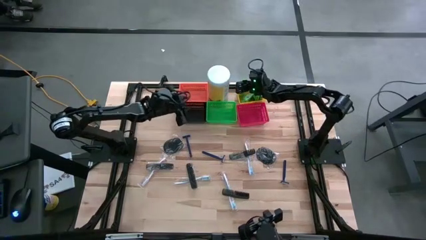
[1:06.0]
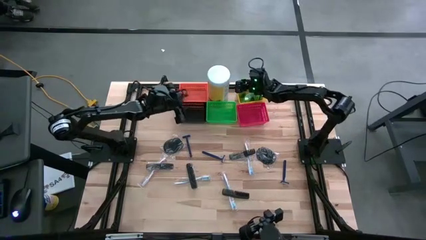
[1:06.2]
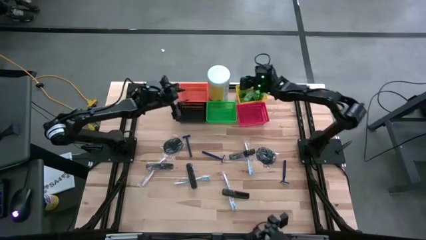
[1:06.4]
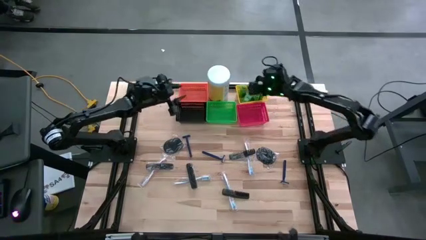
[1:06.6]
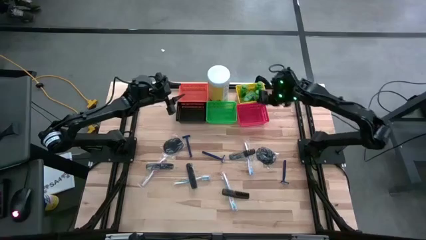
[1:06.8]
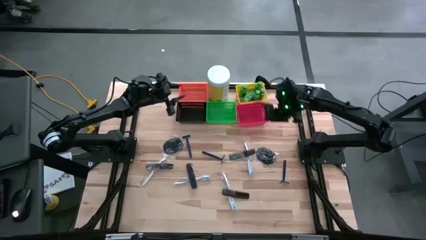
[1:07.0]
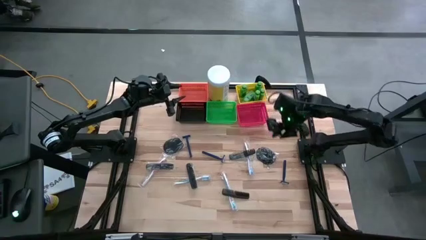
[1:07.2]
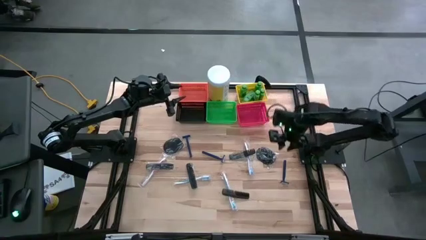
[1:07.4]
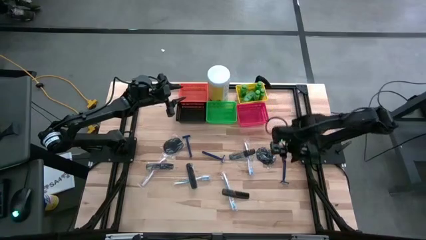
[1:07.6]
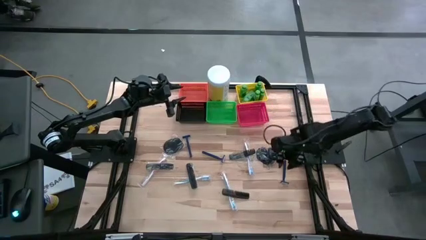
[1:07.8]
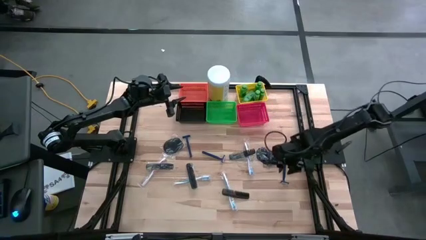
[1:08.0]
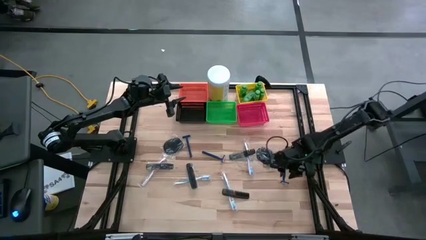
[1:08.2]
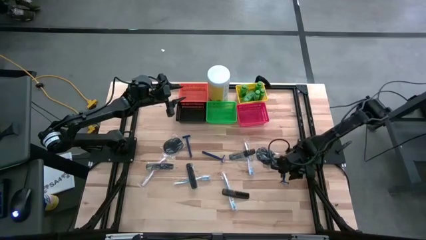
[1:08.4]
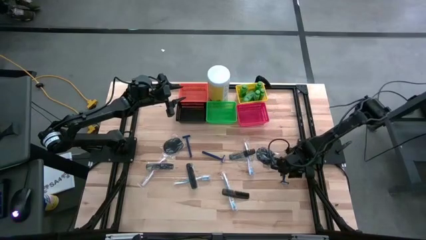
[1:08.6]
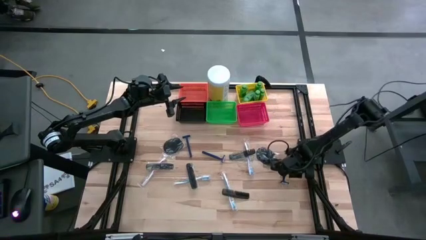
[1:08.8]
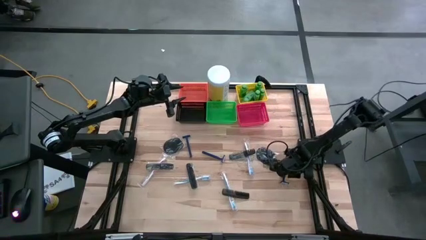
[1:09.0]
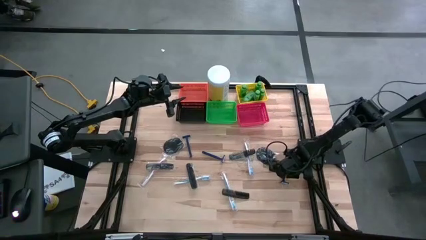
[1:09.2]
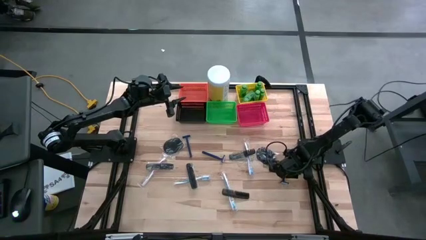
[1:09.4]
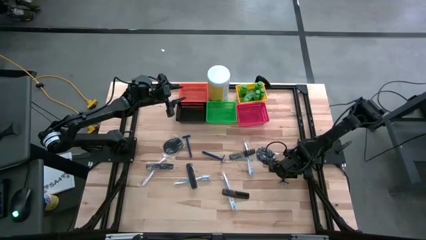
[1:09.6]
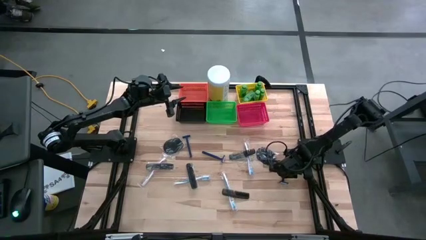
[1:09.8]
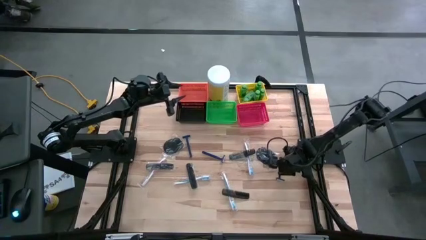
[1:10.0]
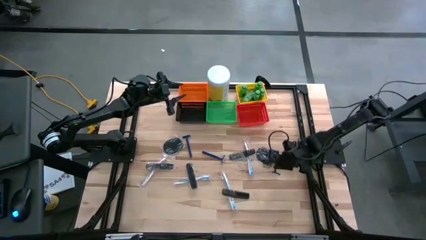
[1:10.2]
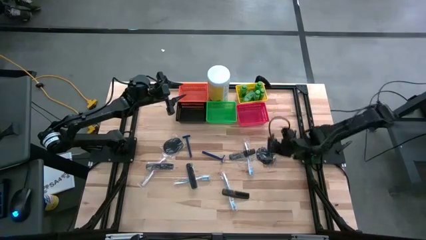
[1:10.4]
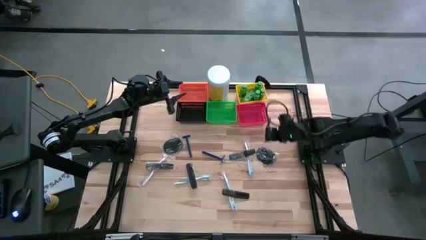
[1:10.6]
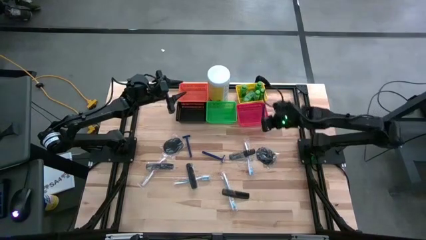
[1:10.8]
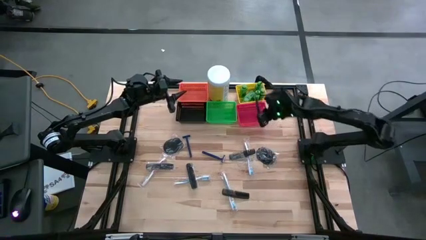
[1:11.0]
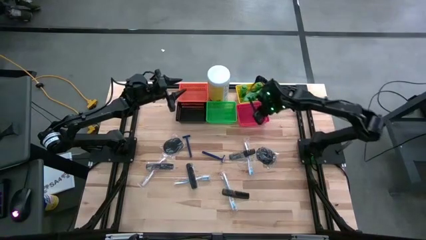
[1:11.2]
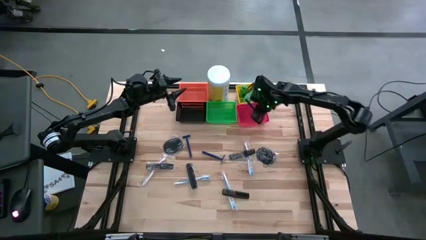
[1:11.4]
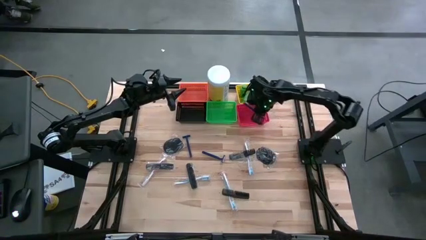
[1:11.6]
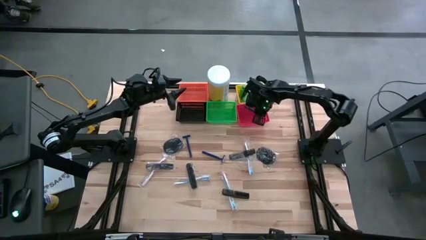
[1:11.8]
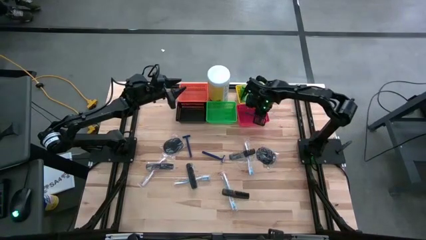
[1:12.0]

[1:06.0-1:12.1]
Task: Pick & Place Travel size toiletries
Put the blue razor into the red bin

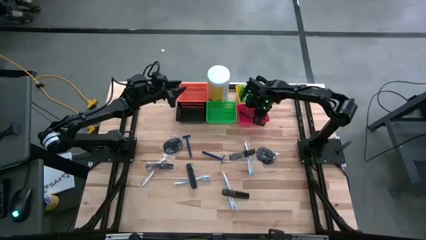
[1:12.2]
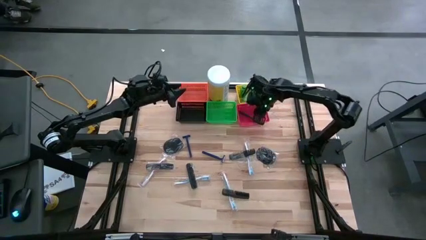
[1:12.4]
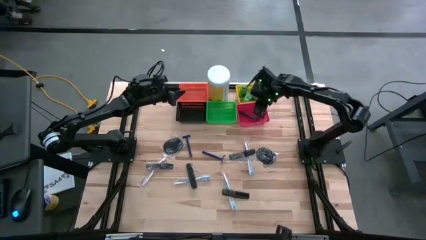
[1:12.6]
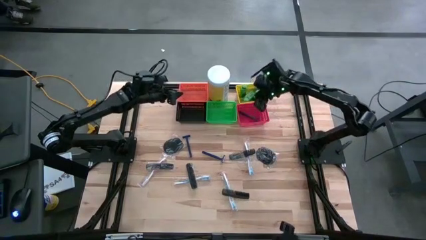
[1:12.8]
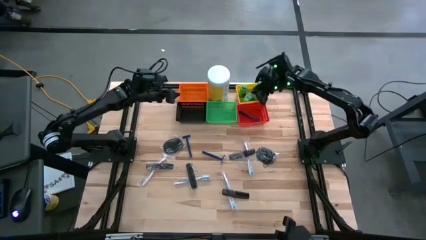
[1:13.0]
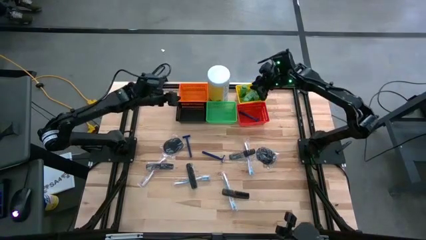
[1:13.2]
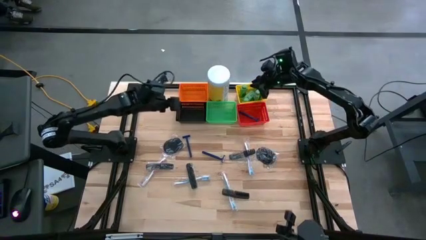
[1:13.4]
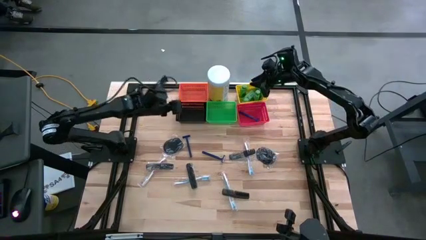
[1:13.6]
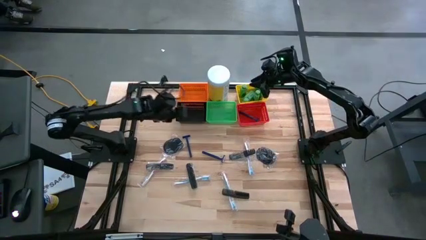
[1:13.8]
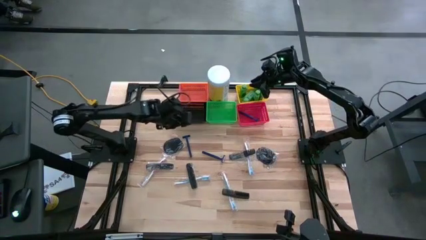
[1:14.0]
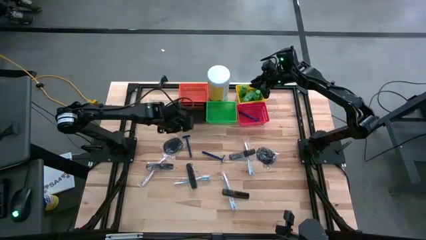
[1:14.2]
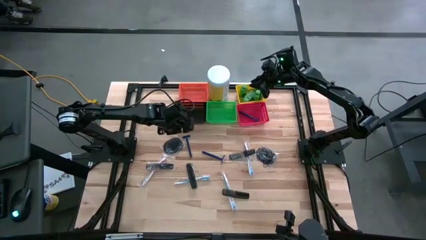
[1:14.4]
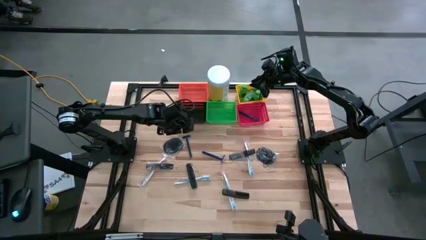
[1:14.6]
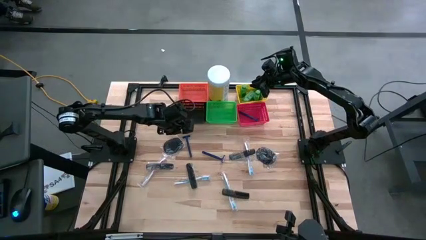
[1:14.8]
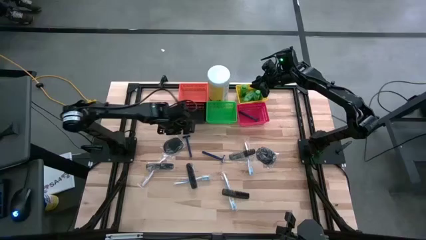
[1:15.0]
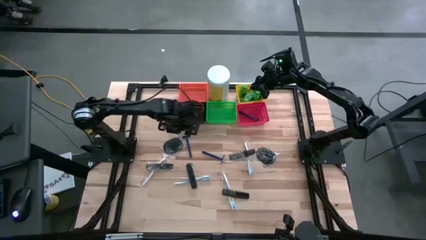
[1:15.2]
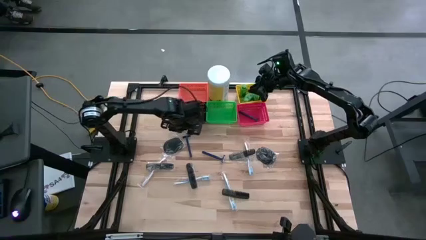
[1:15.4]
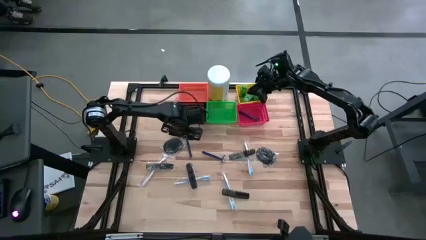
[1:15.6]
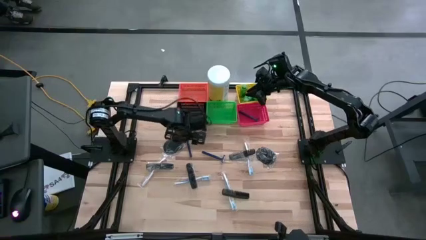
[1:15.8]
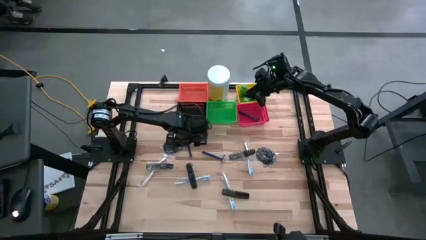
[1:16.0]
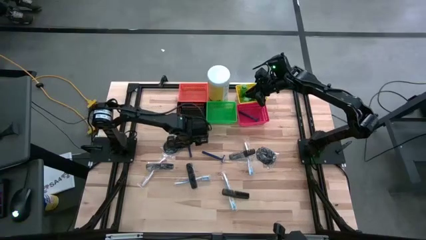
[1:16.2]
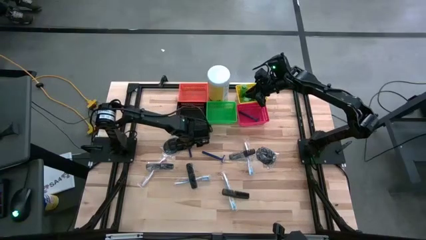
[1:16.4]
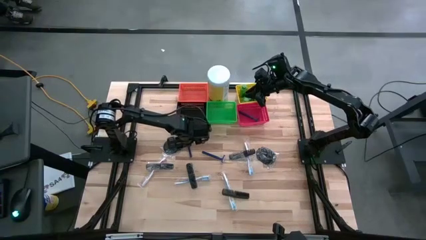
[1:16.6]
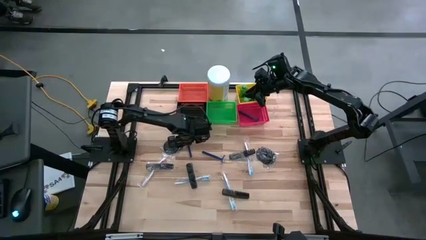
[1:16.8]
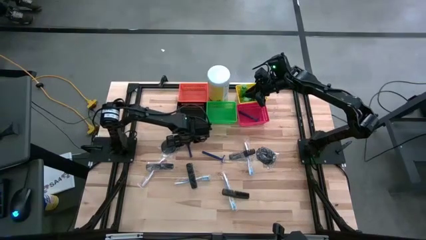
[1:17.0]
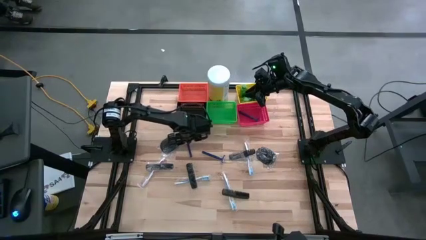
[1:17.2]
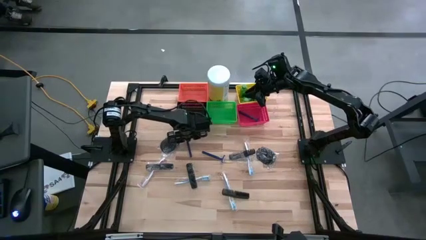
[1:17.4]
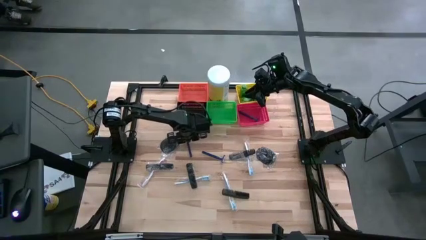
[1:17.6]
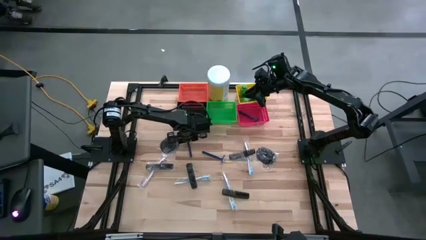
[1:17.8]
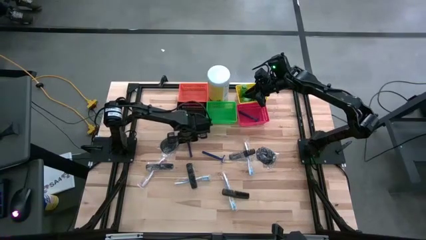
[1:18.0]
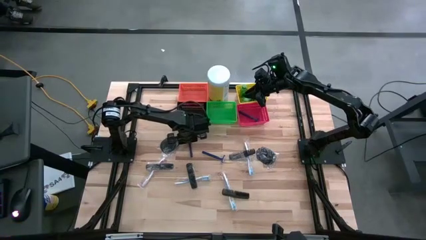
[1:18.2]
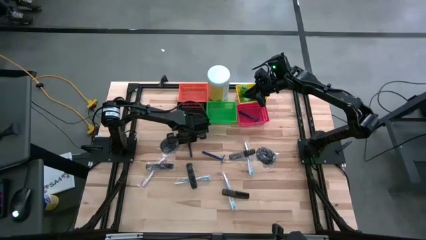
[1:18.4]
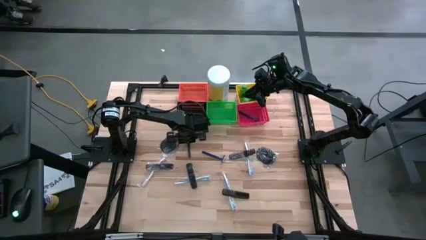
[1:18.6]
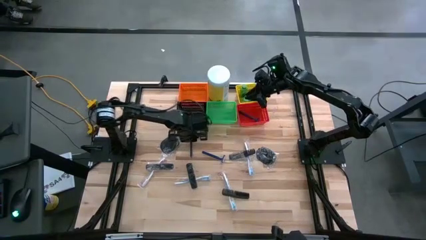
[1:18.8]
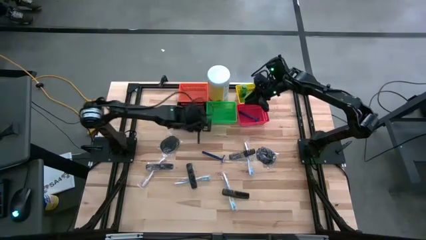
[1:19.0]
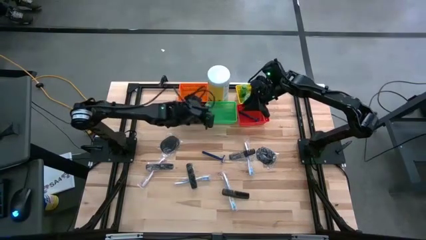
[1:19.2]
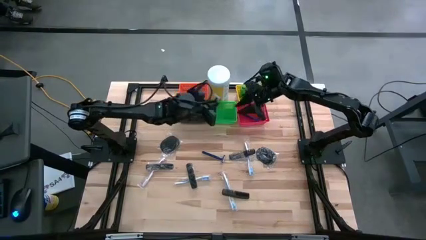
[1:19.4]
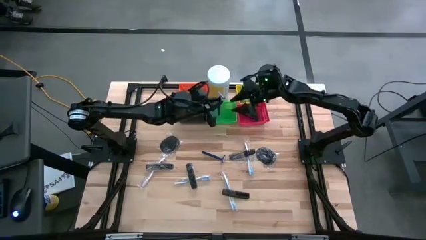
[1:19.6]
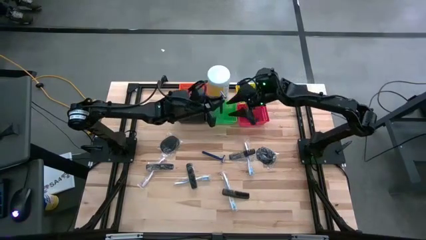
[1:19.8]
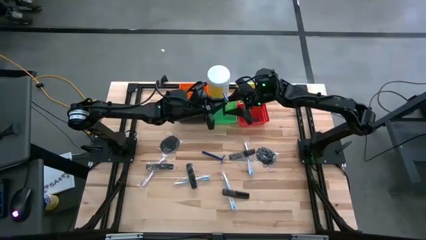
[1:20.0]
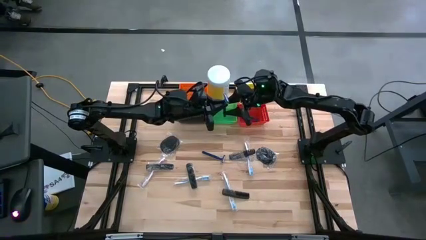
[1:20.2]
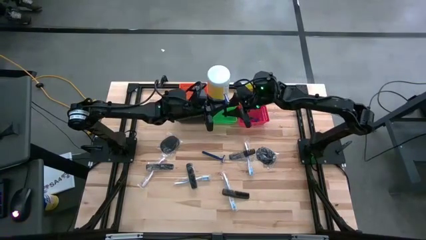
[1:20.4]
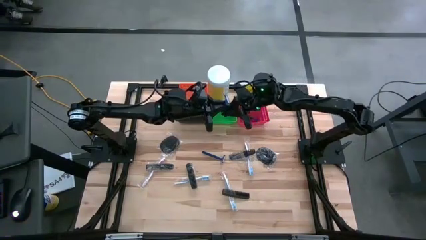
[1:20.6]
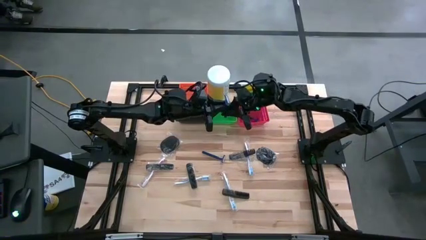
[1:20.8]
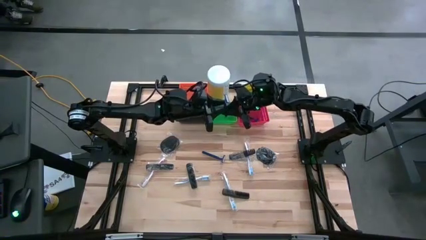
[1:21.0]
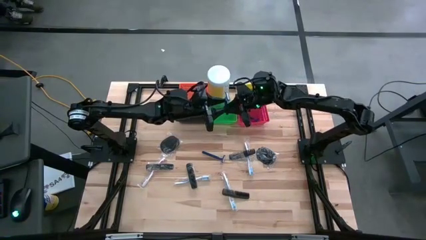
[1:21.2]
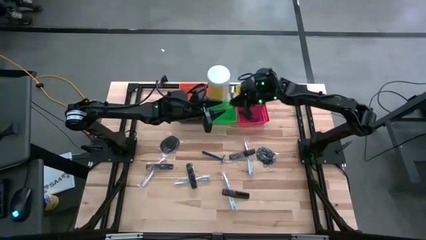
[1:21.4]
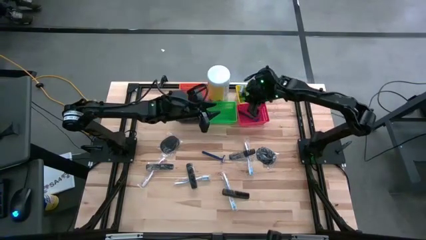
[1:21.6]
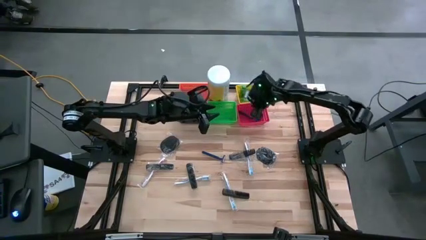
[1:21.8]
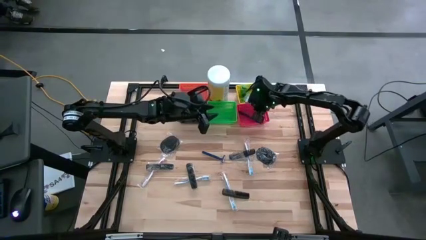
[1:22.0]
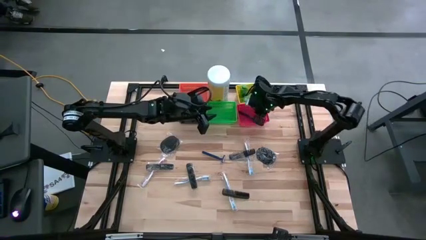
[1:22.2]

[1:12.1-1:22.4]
Put the blue razor into the red bin
